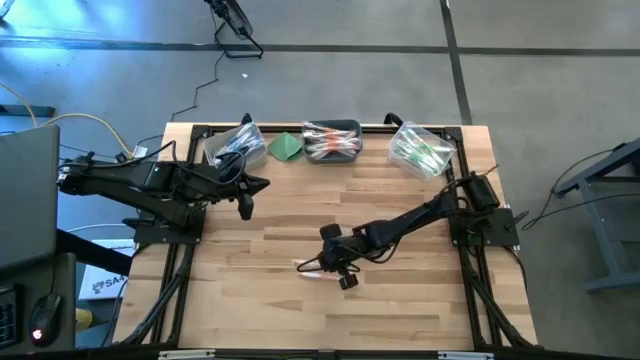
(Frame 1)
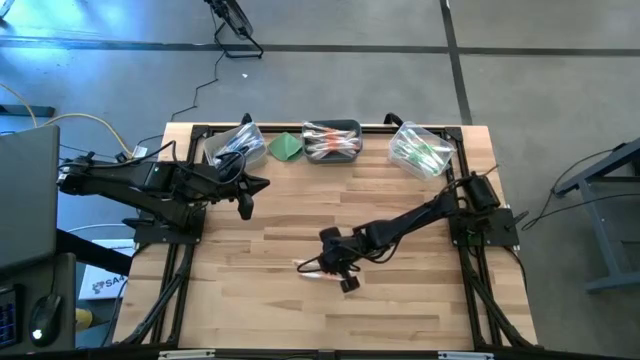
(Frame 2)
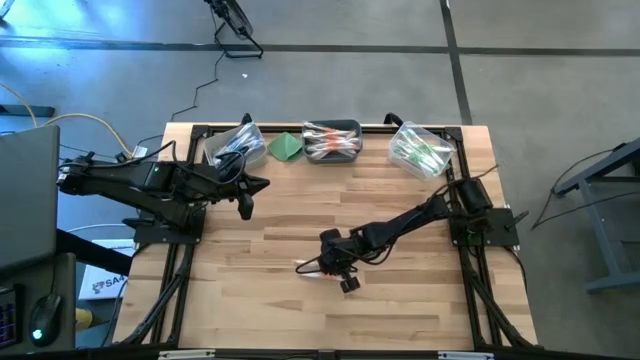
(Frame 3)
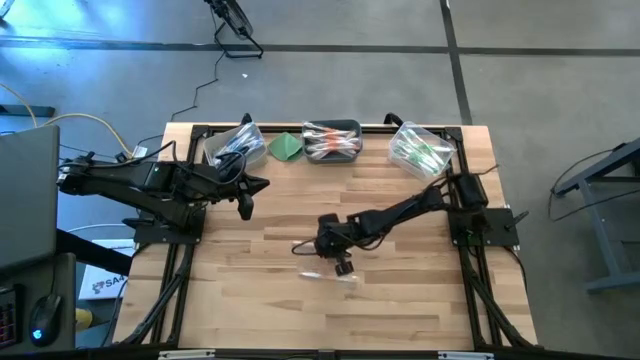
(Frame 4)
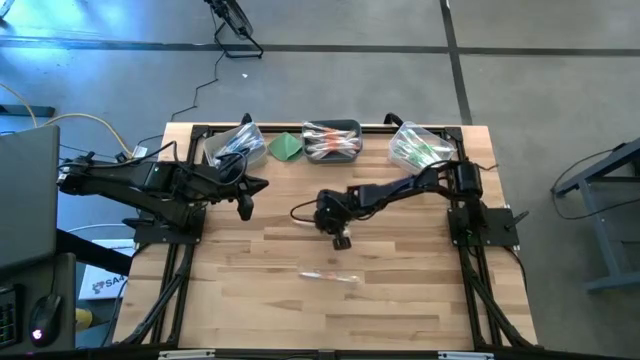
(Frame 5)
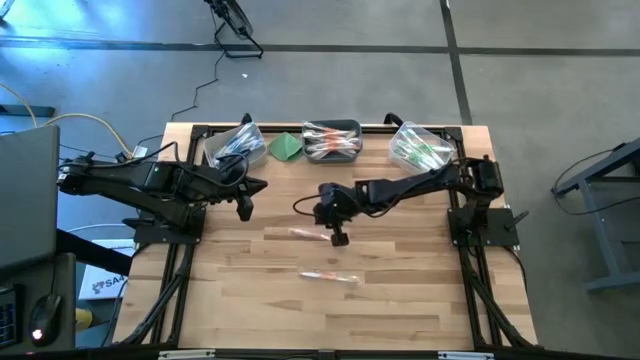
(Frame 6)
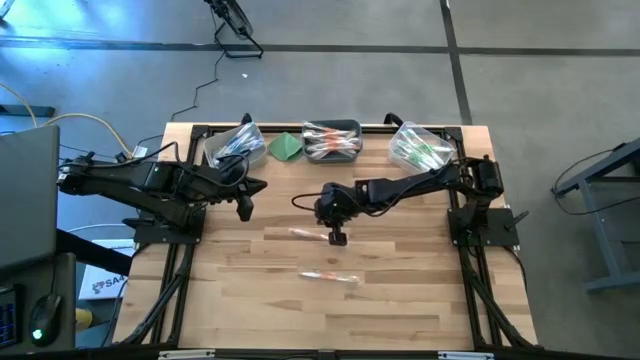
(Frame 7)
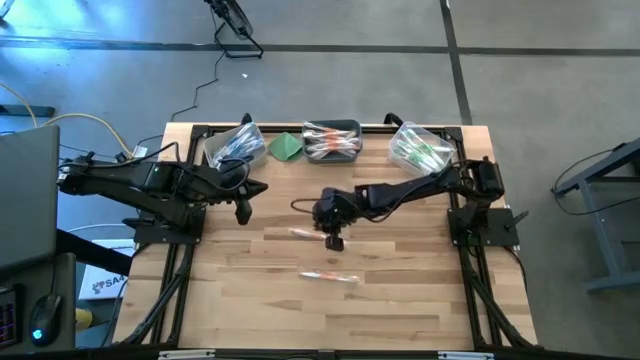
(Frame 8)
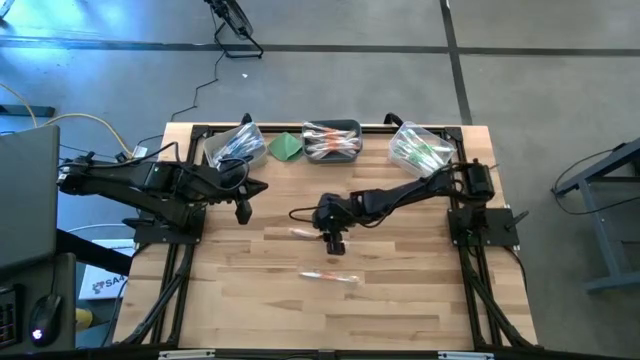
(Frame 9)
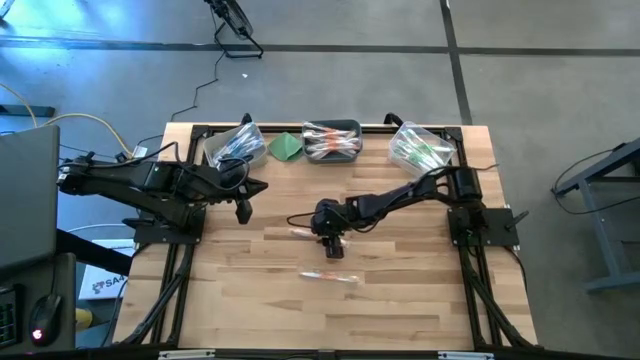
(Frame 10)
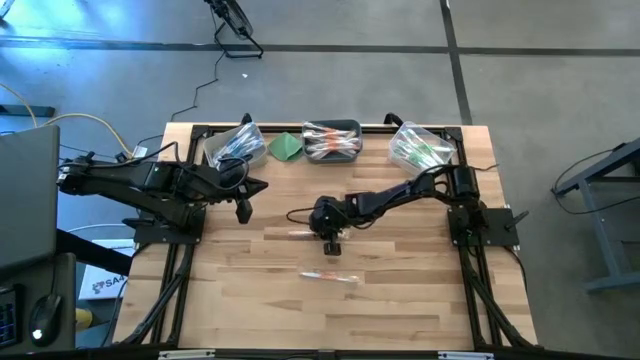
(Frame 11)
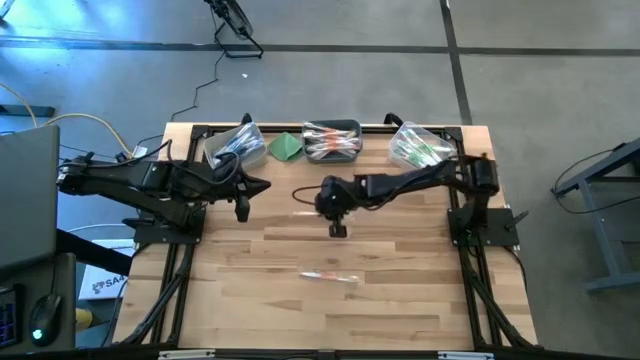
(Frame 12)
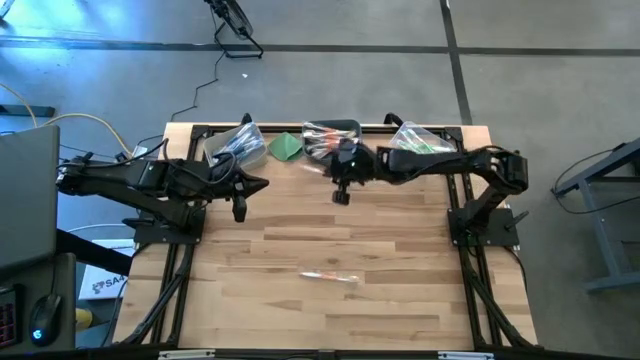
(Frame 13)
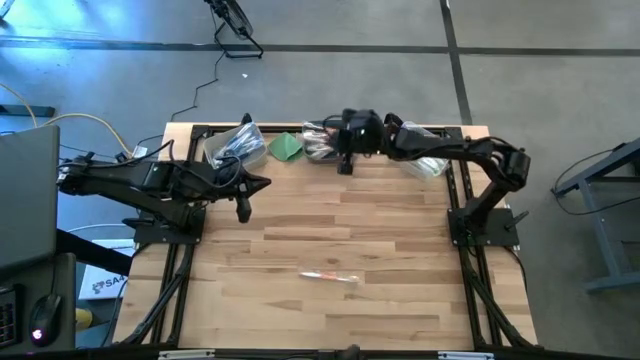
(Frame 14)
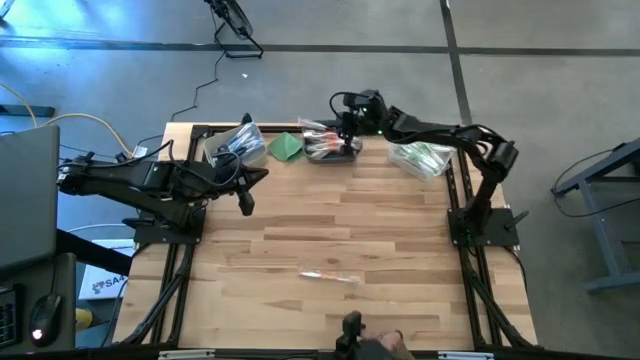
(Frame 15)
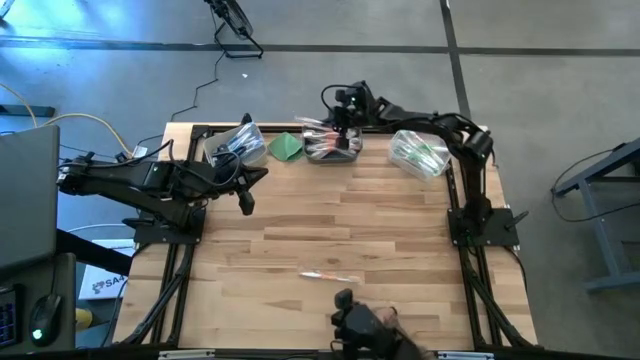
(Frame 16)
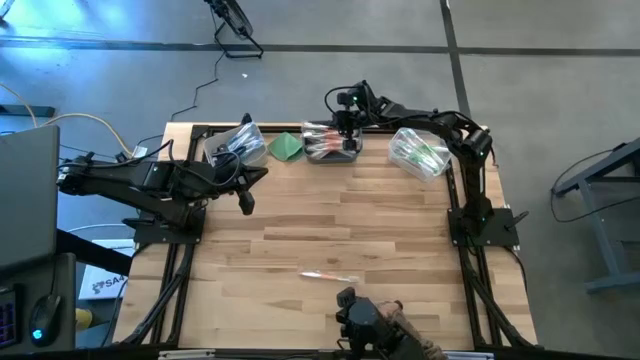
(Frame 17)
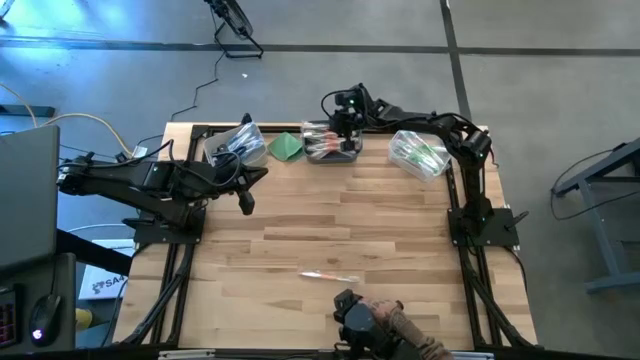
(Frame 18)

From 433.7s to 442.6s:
Task: Pick & Place Toothbrushes
Put the top orange toothbrush into the blue bin

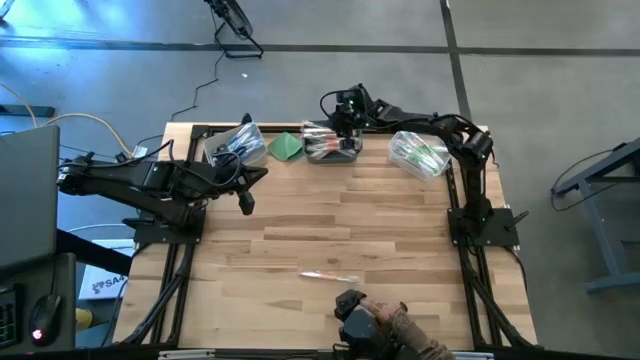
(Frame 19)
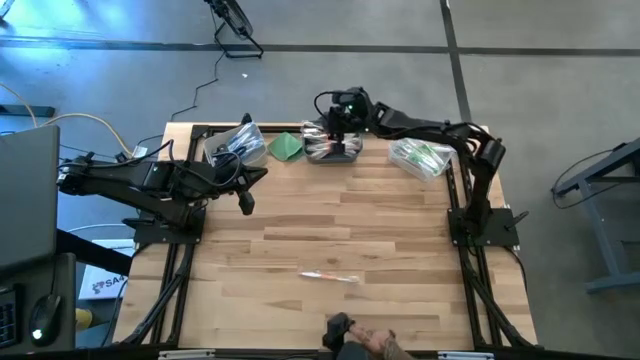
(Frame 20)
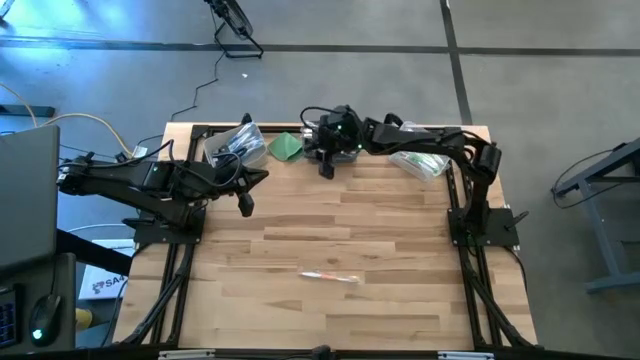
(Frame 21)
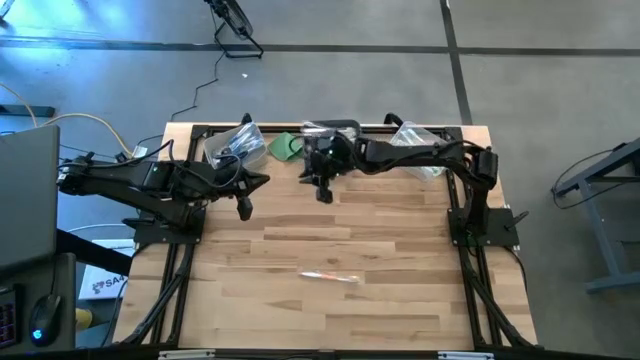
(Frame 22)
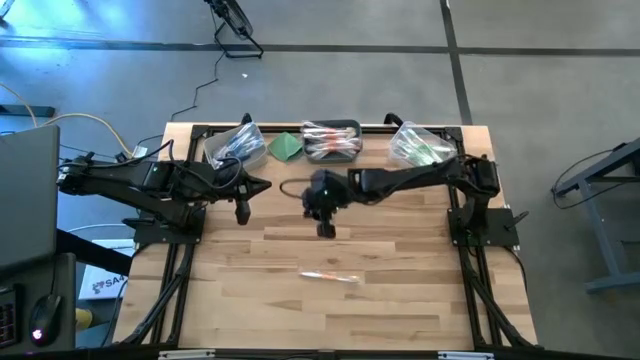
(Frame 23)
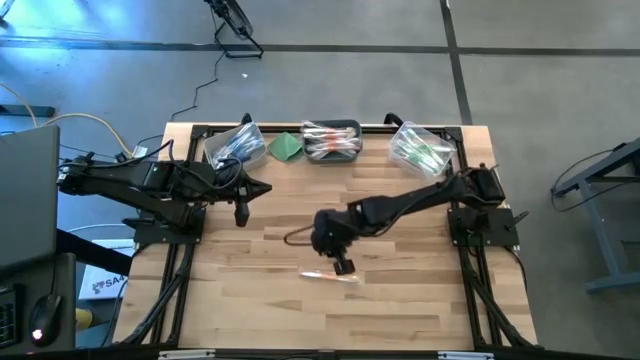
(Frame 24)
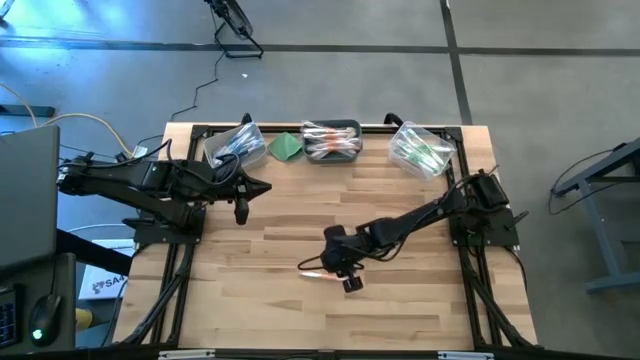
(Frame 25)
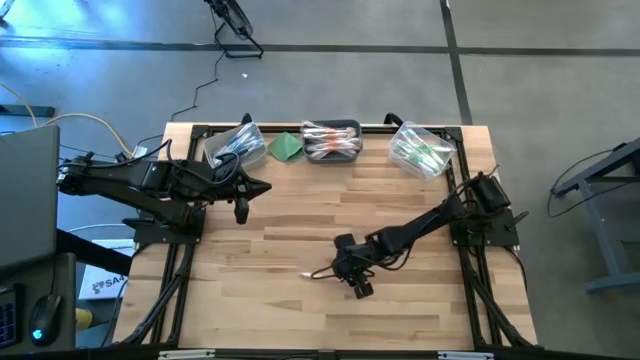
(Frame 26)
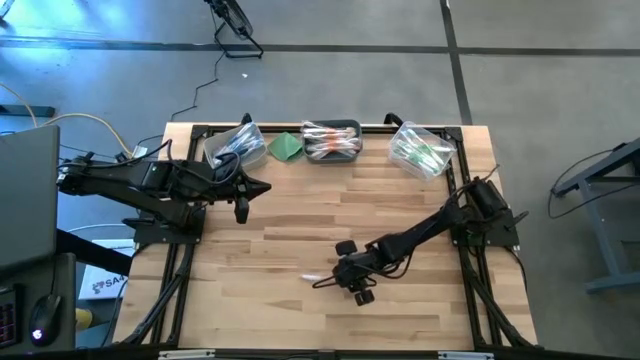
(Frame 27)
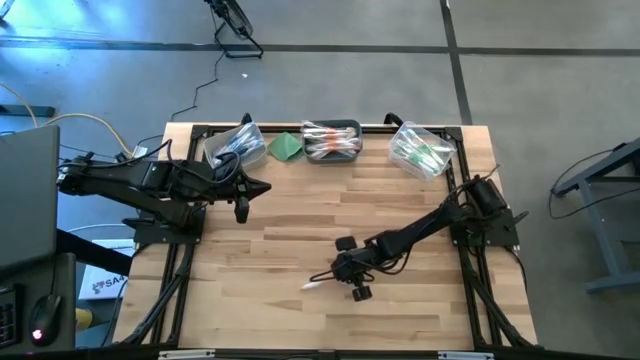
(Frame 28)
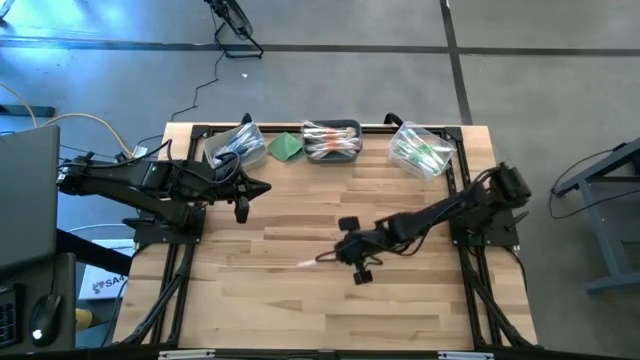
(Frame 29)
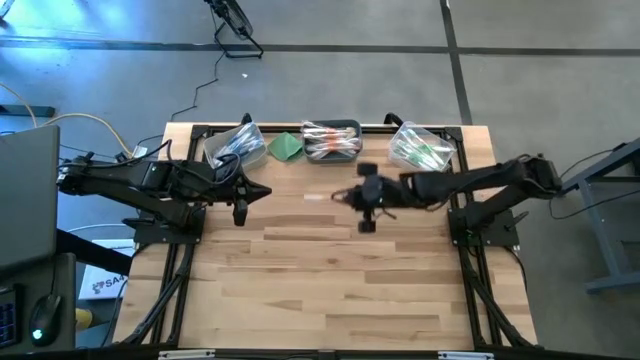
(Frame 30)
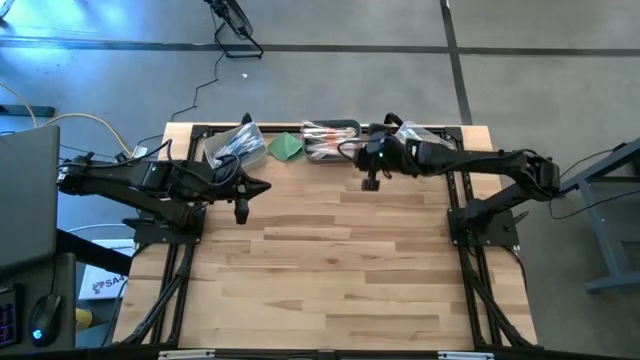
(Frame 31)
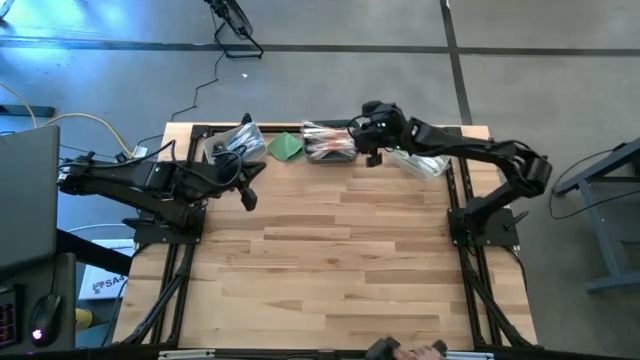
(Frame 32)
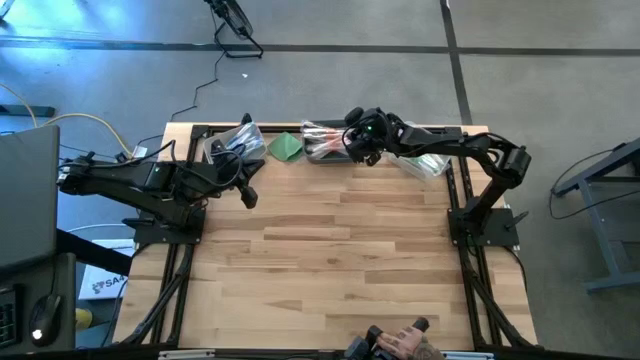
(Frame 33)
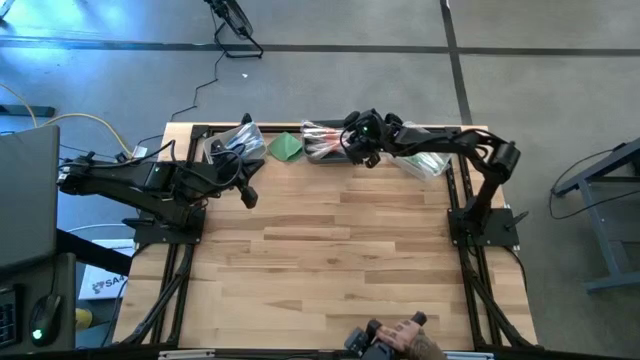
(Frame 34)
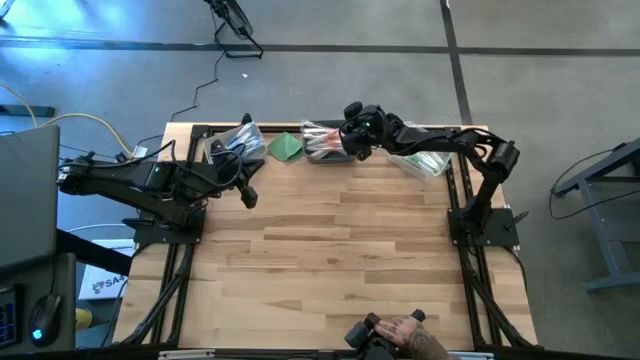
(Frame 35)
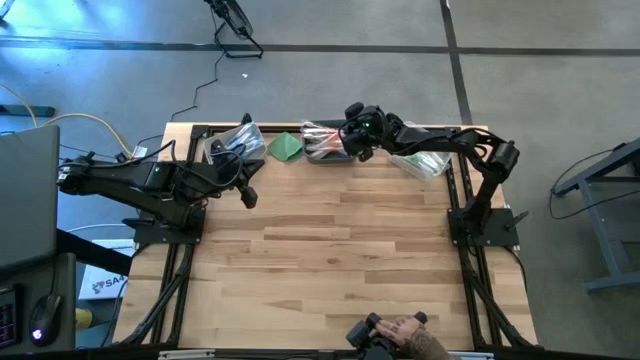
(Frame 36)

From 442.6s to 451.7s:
Put the orange toothbrush into the blue bin
